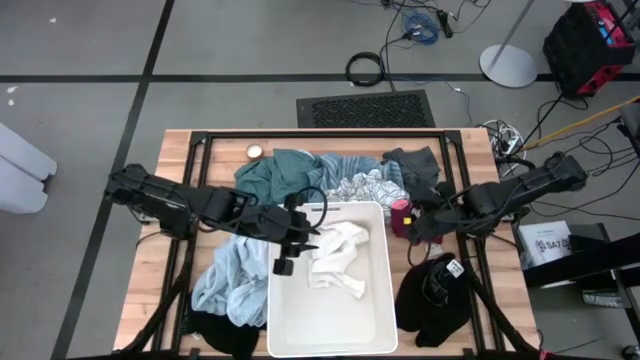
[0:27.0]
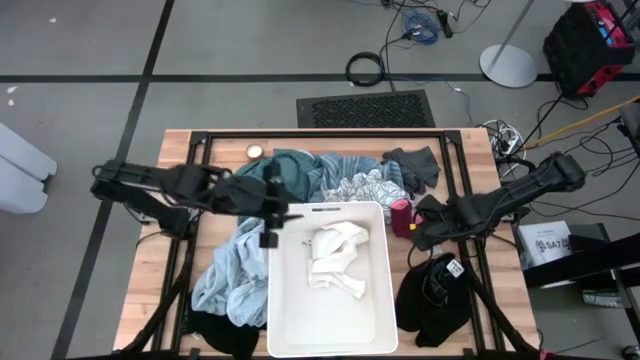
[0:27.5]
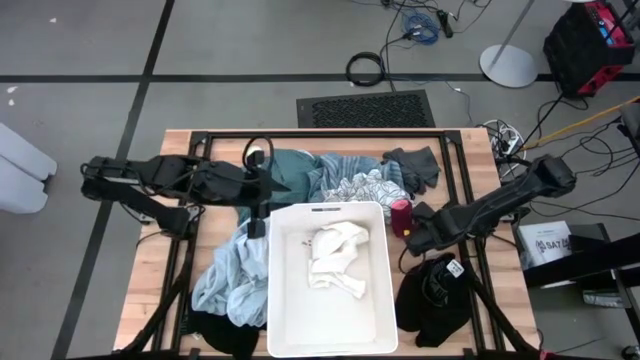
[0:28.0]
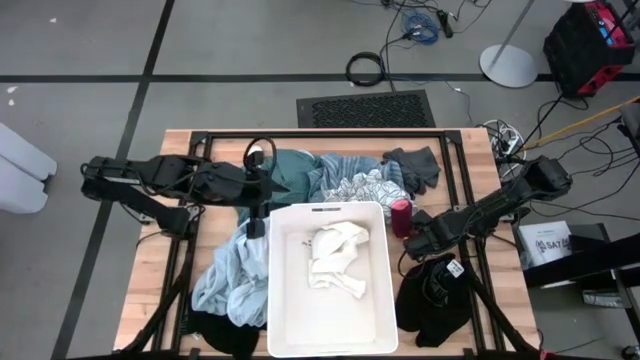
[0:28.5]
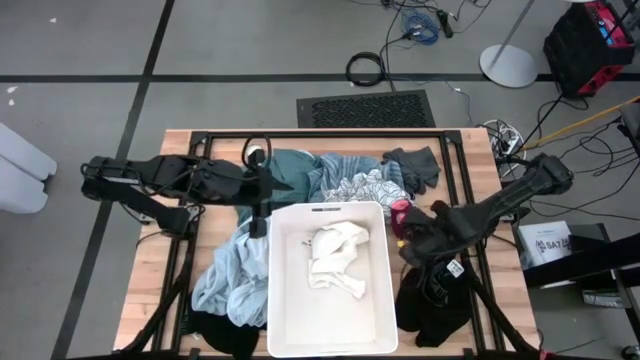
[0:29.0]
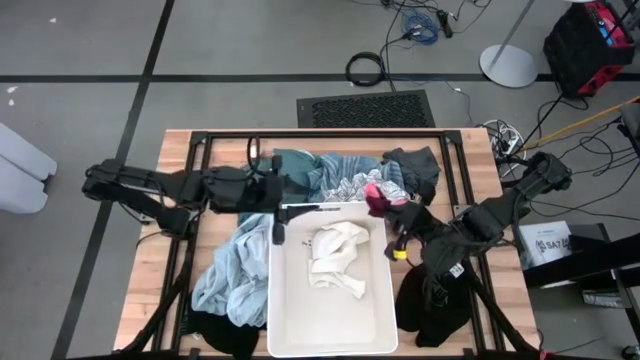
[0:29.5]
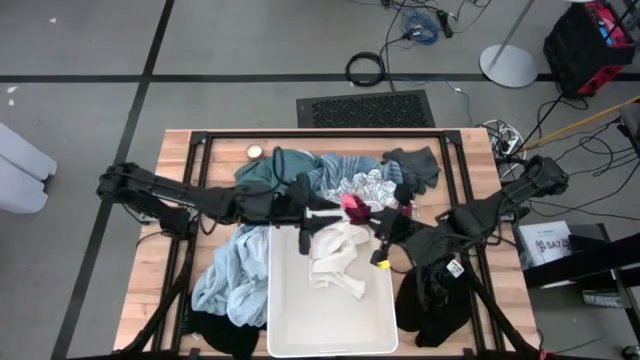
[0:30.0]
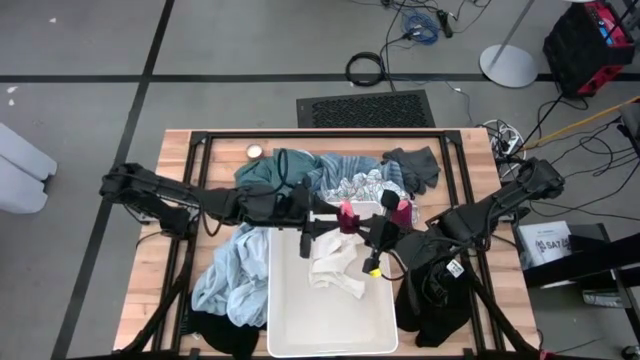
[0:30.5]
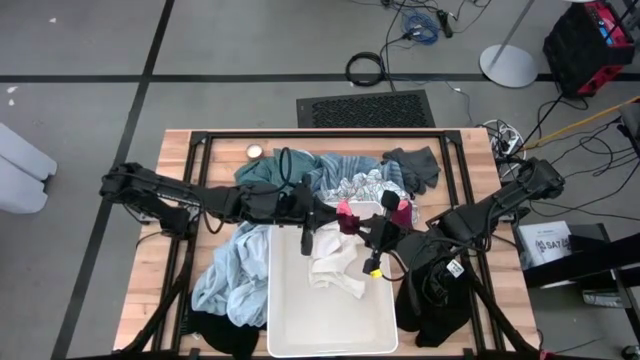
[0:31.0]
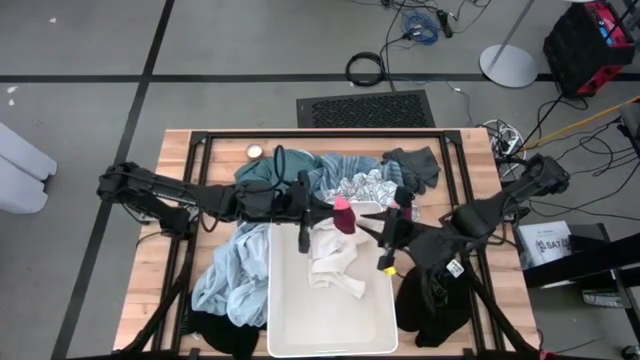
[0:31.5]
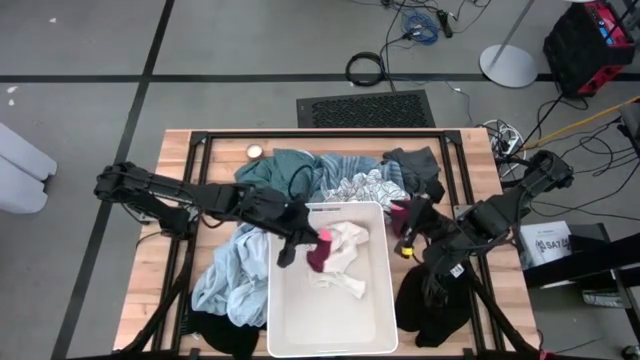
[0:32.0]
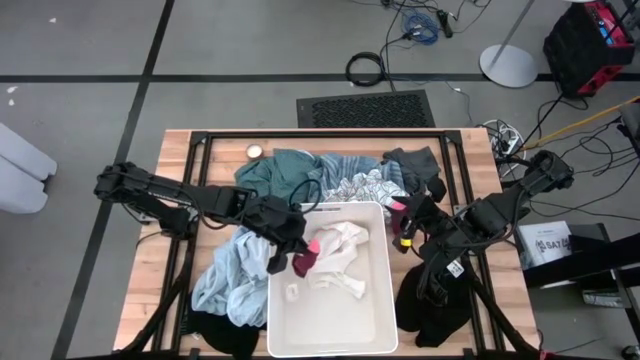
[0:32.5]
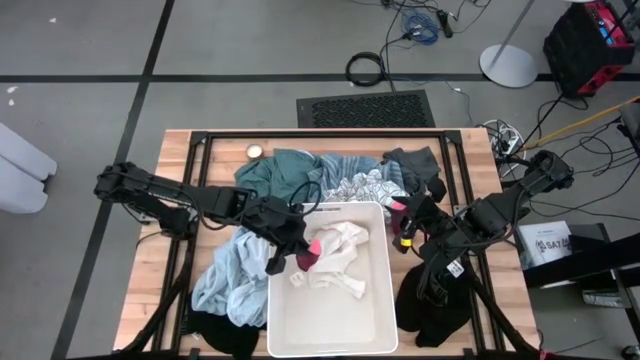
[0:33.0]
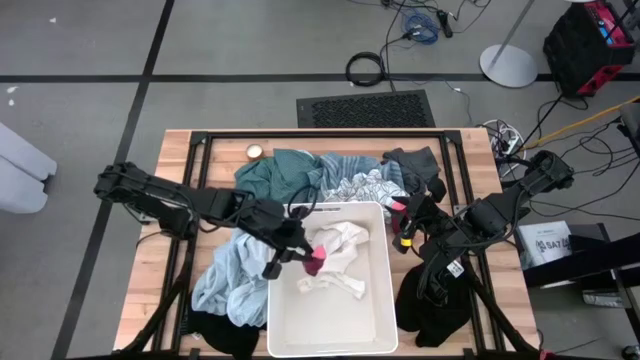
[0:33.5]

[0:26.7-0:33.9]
Task: Sort clothes
Put the red sock into the white laundry bin

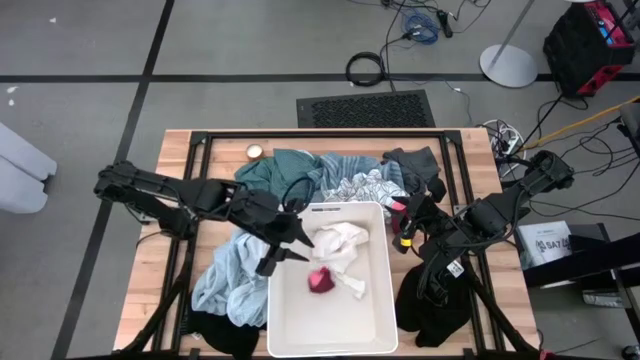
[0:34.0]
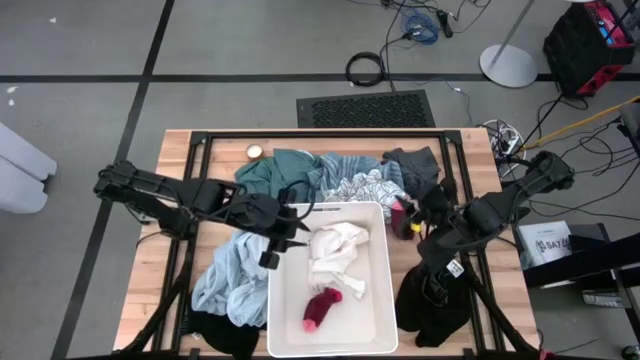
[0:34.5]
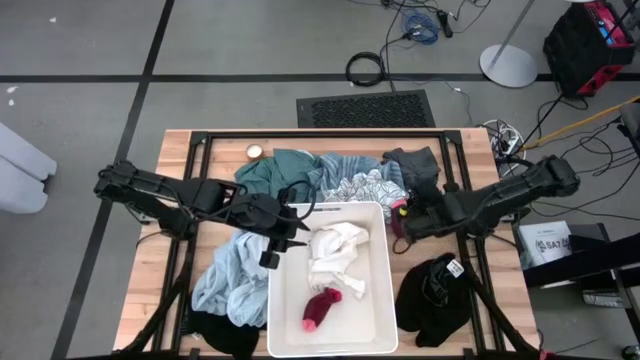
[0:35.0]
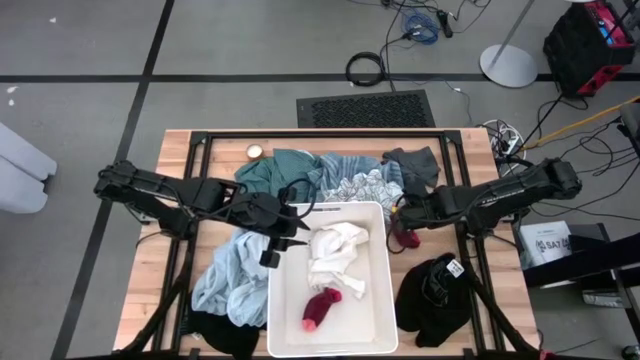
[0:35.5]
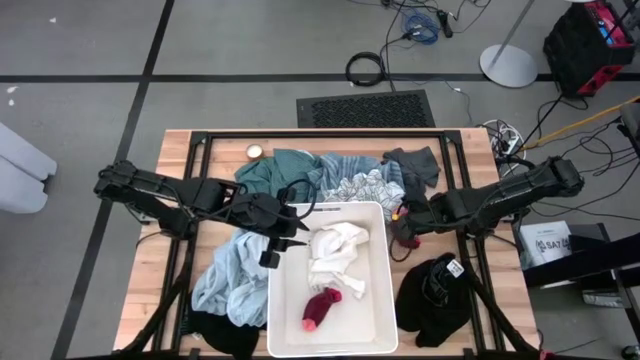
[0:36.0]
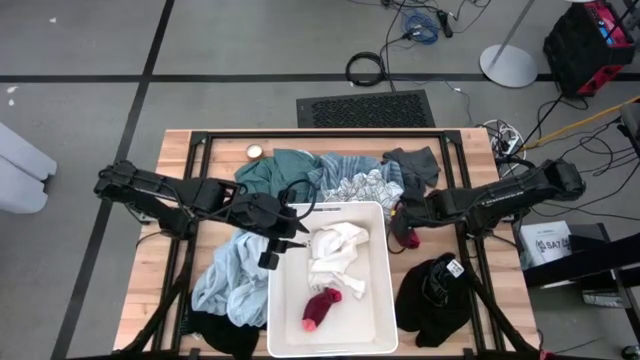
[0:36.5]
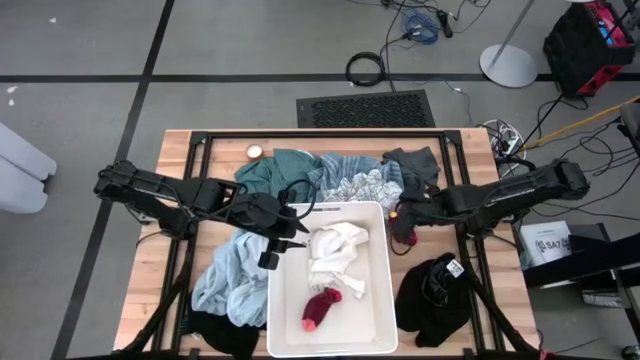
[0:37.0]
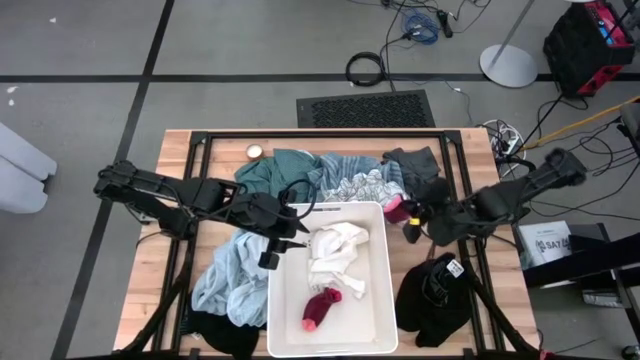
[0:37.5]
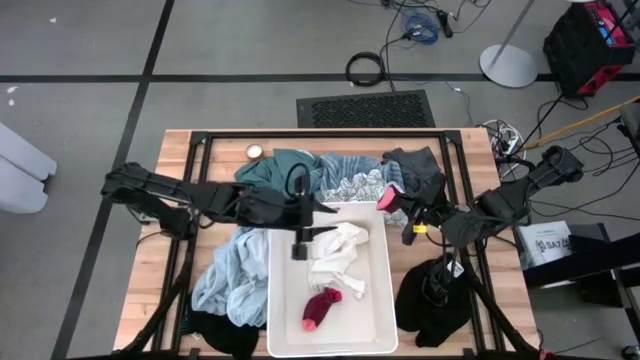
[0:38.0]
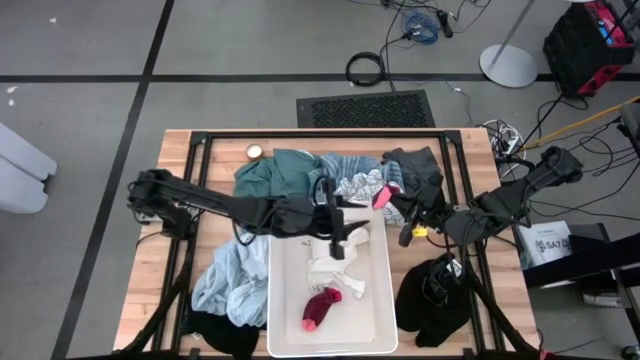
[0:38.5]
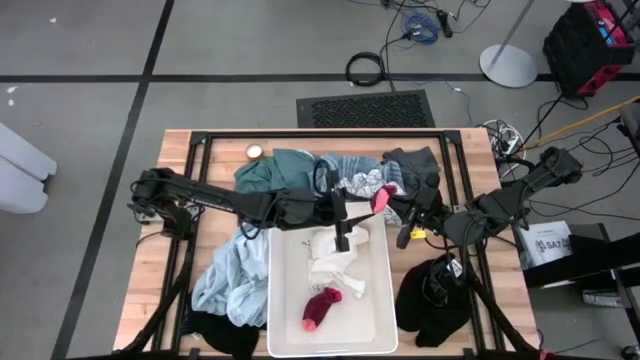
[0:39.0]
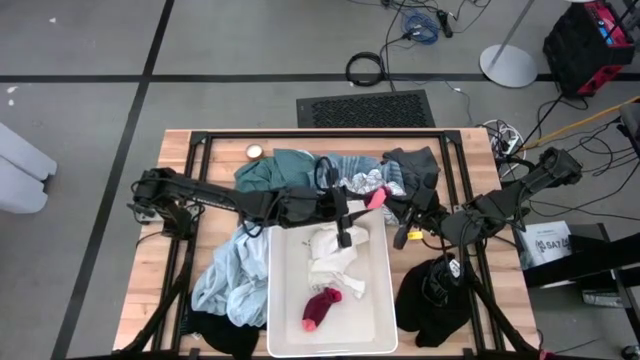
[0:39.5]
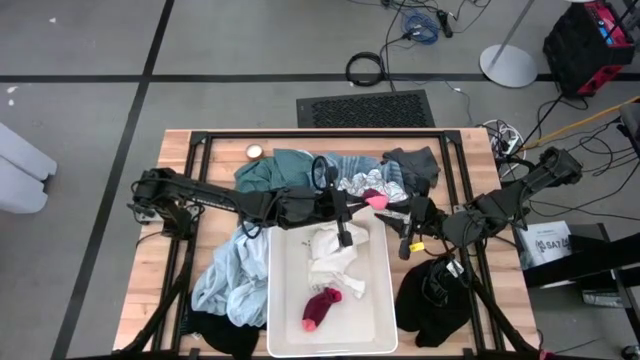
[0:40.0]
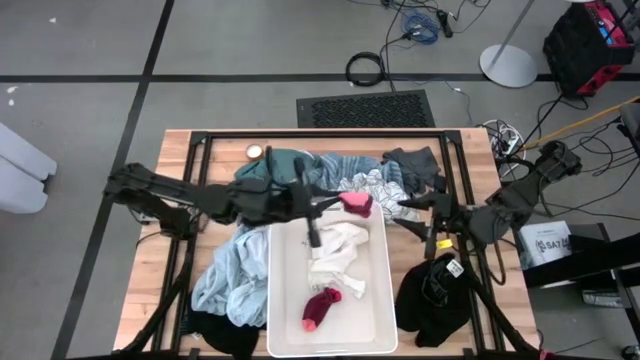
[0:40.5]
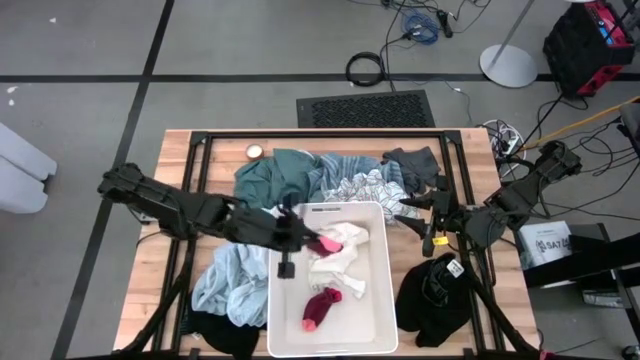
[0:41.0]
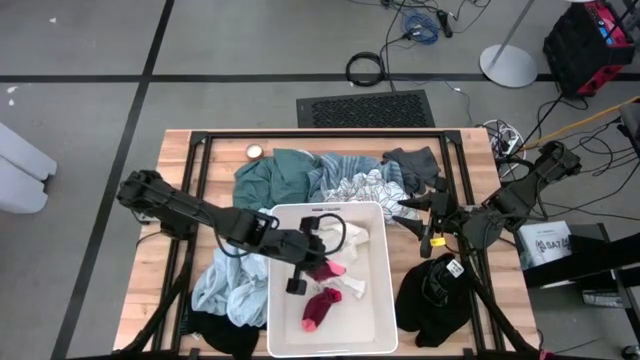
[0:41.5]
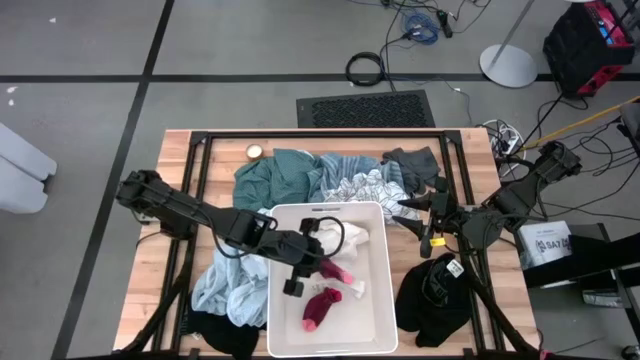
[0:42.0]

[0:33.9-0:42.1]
Put the sock into the white laundry bin

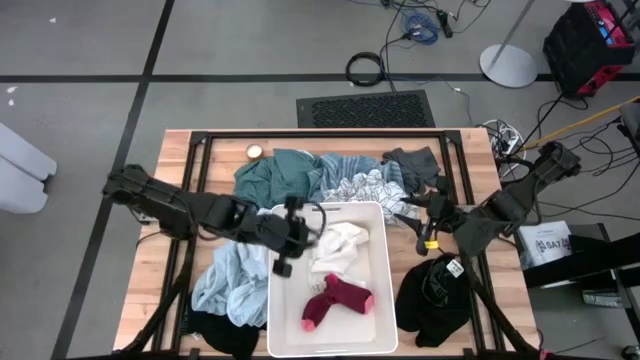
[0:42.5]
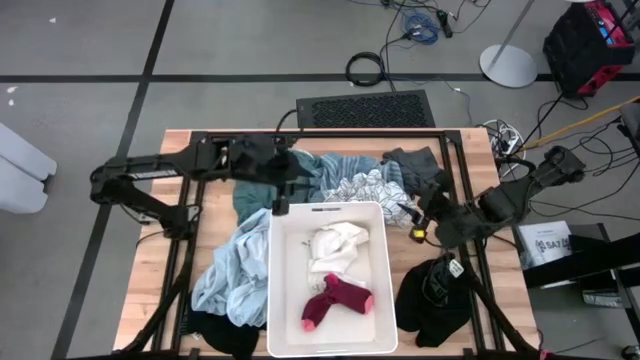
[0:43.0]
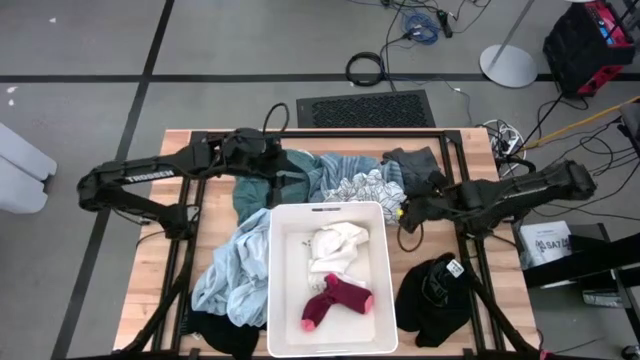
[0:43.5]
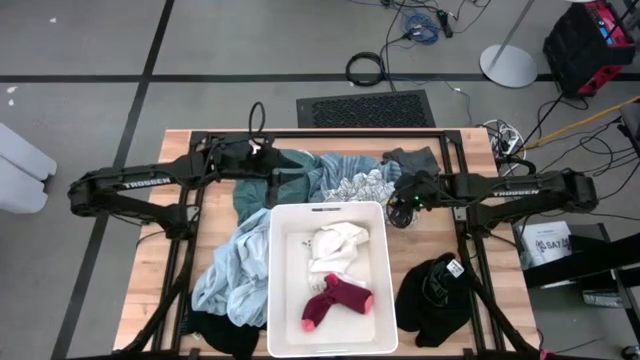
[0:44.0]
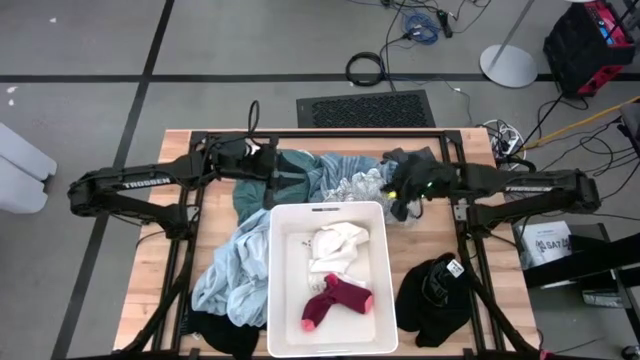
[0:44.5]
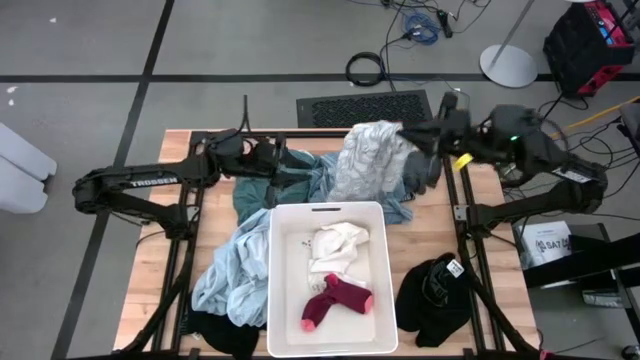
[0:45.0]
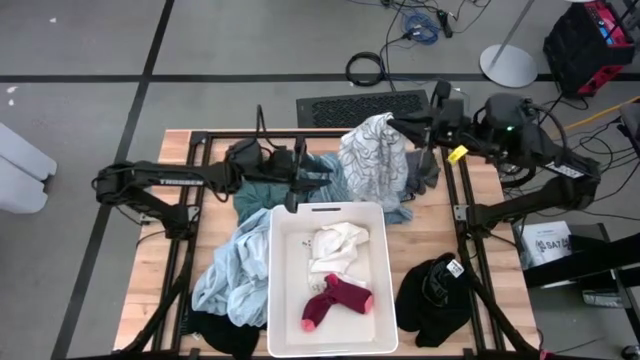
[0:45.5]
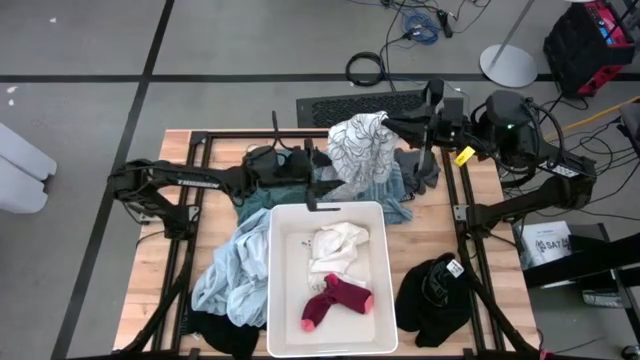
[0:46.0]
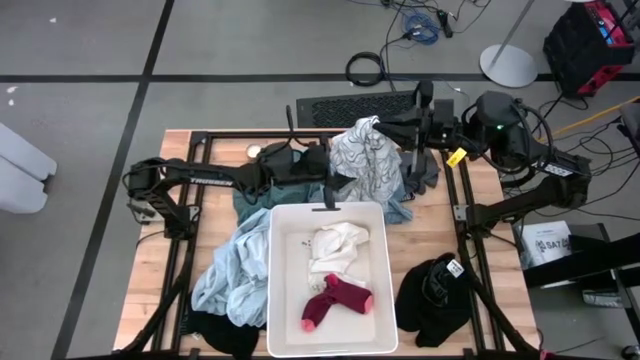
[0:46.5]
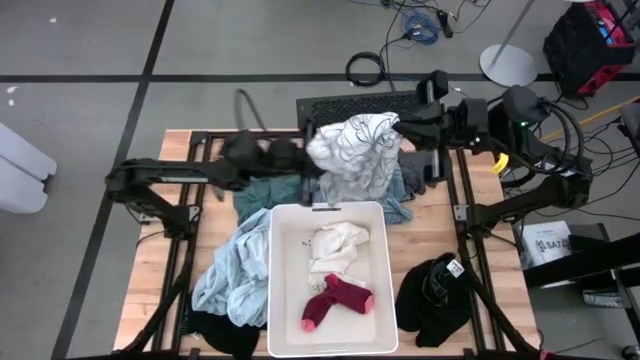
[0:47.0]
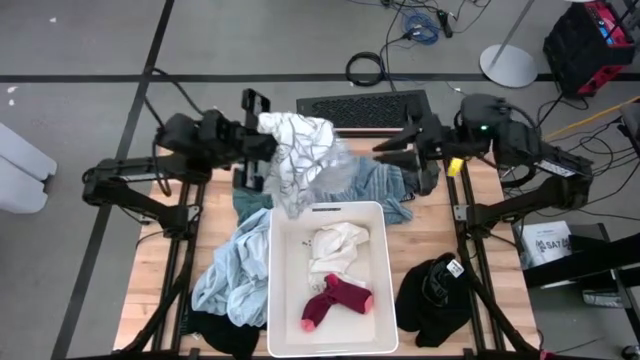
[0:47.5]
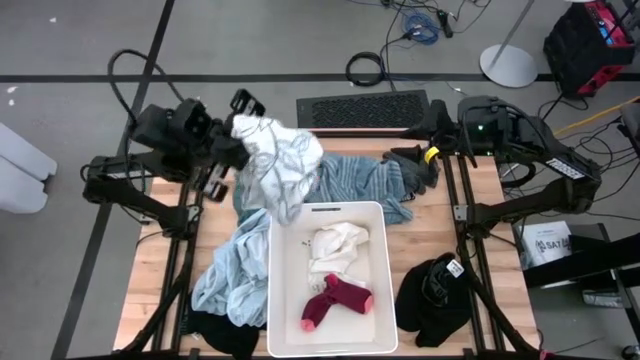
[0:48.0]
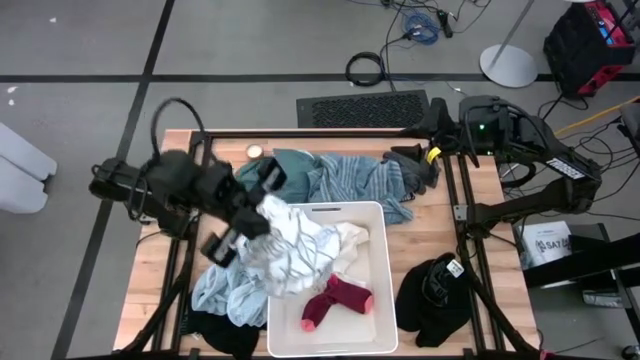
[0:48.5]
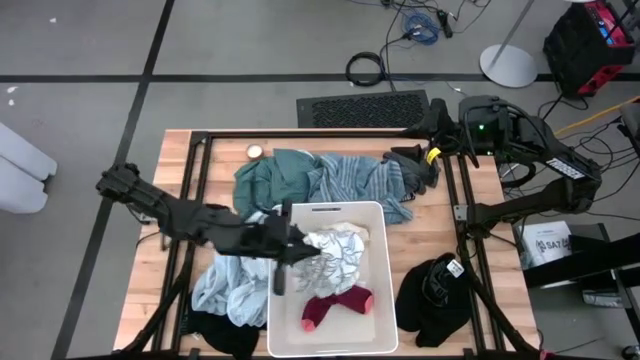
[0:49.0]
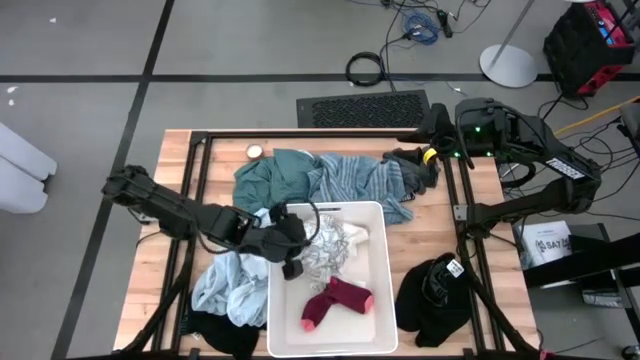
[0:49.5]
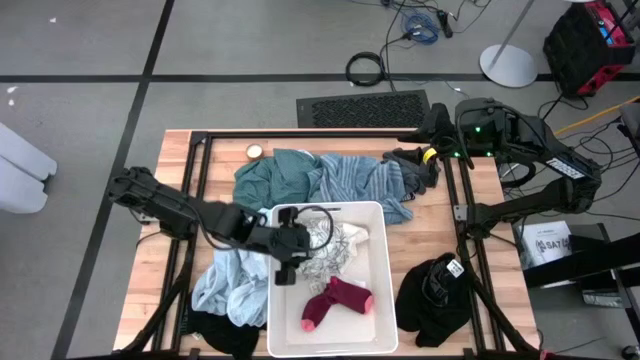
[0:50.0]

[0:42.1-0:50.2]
Put the white polo shirt into the white laundry bin
